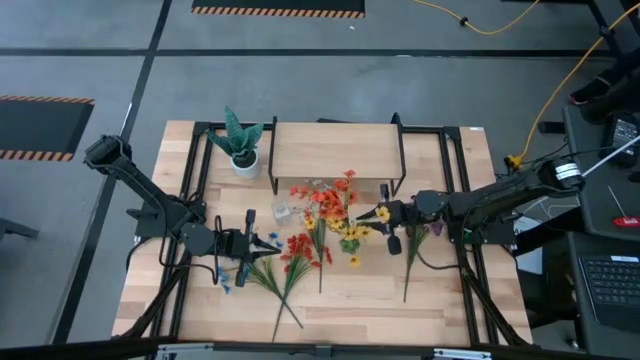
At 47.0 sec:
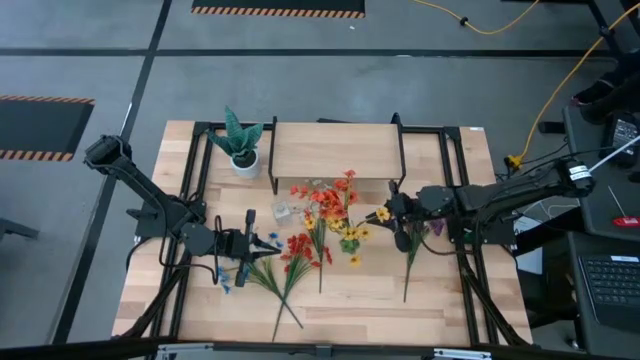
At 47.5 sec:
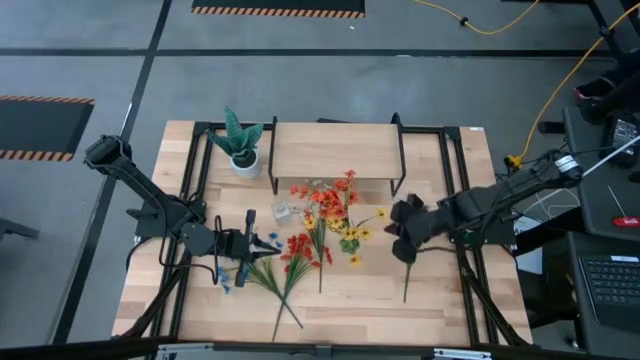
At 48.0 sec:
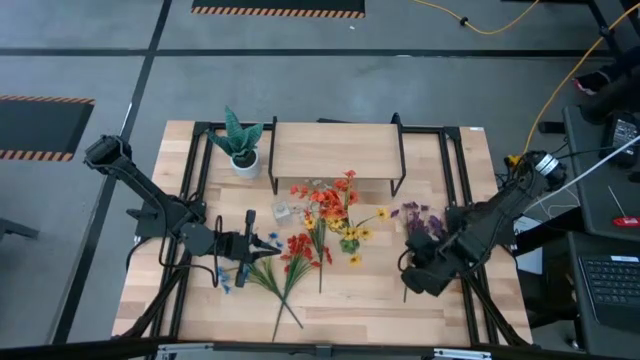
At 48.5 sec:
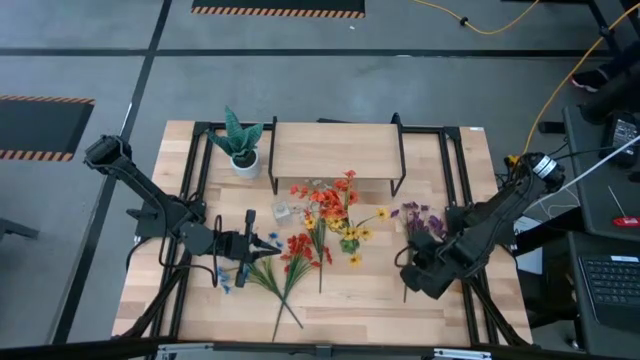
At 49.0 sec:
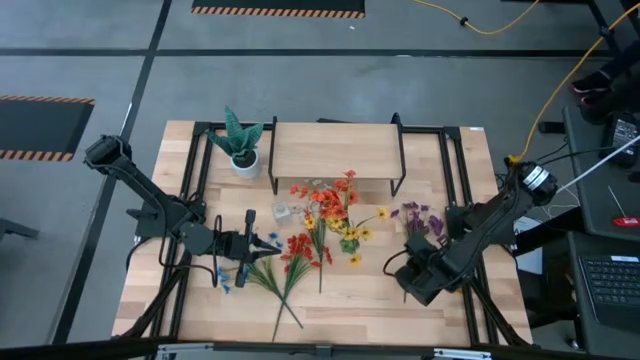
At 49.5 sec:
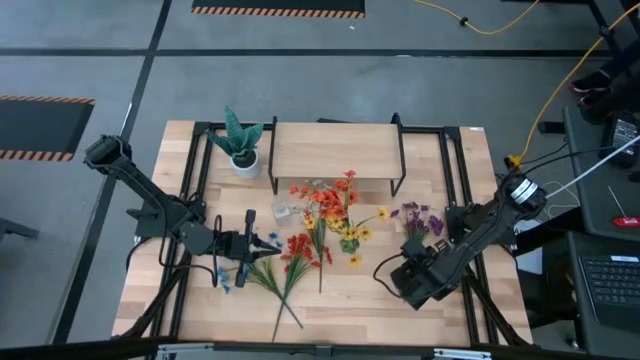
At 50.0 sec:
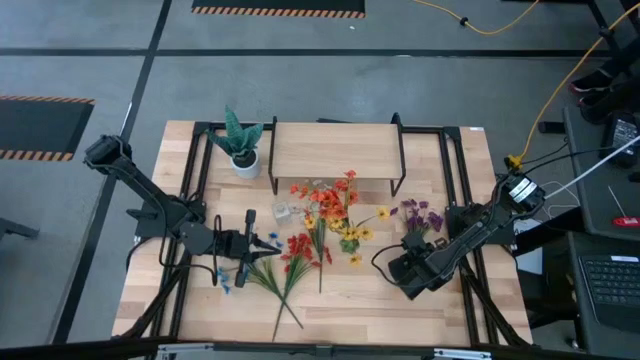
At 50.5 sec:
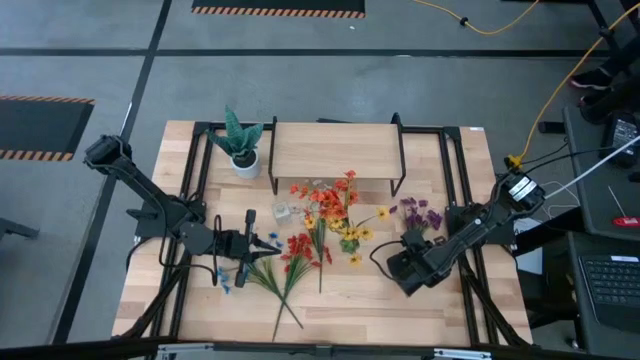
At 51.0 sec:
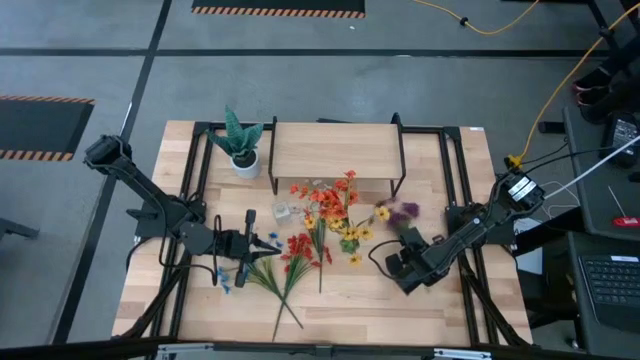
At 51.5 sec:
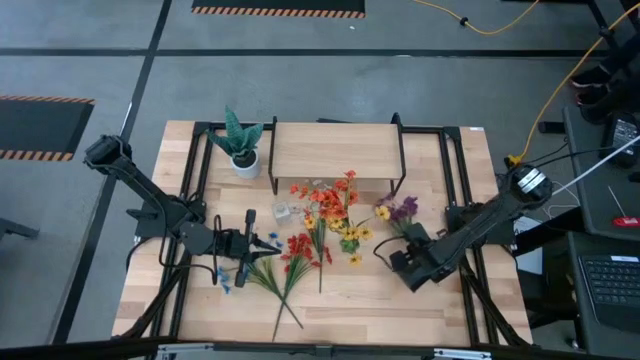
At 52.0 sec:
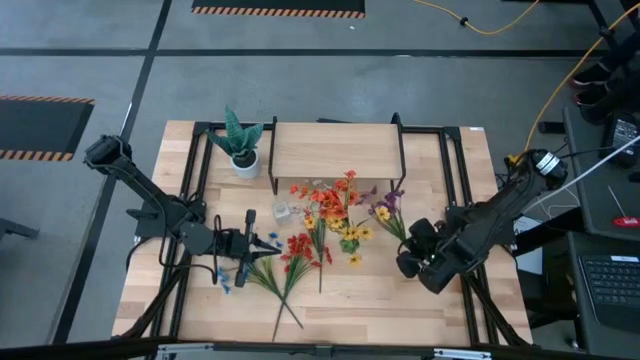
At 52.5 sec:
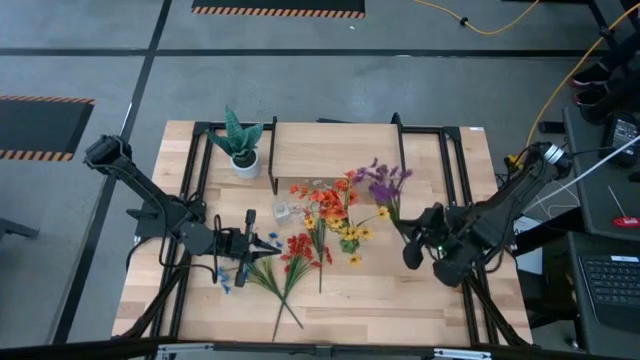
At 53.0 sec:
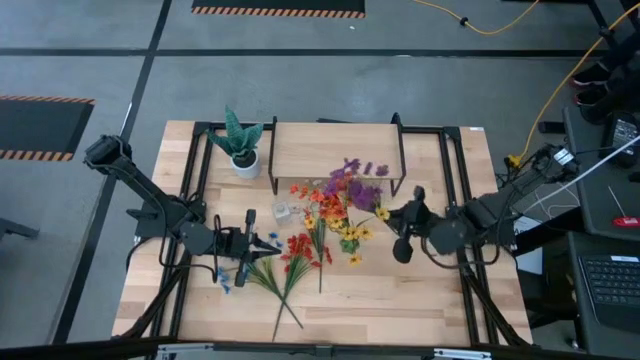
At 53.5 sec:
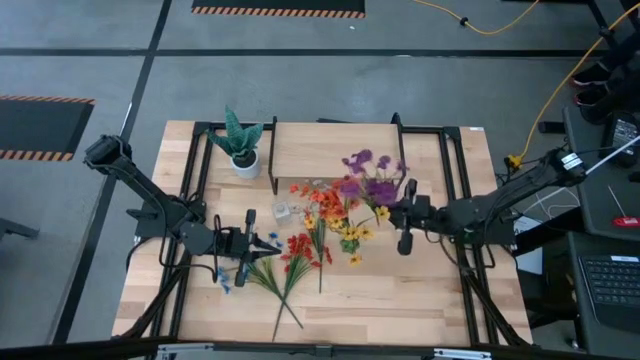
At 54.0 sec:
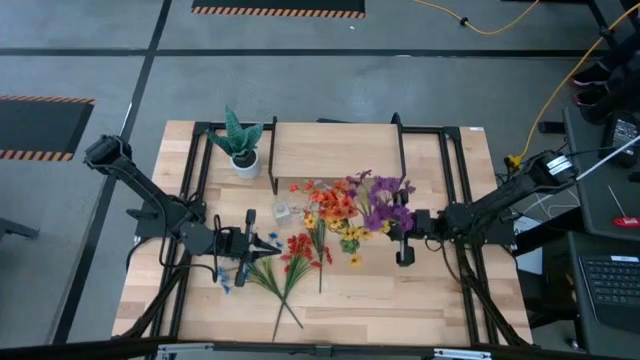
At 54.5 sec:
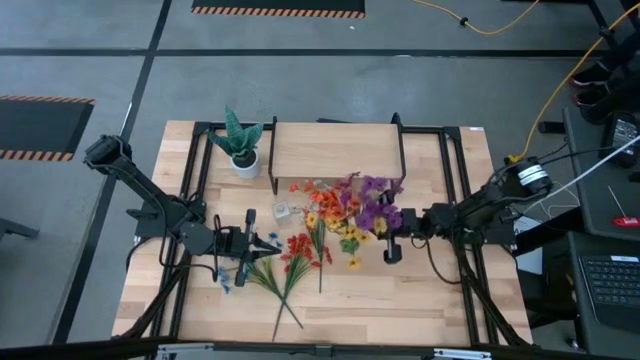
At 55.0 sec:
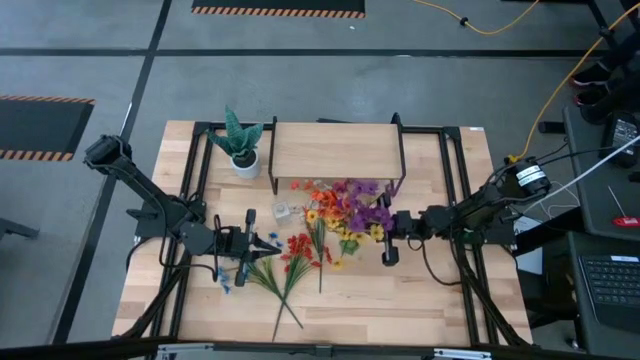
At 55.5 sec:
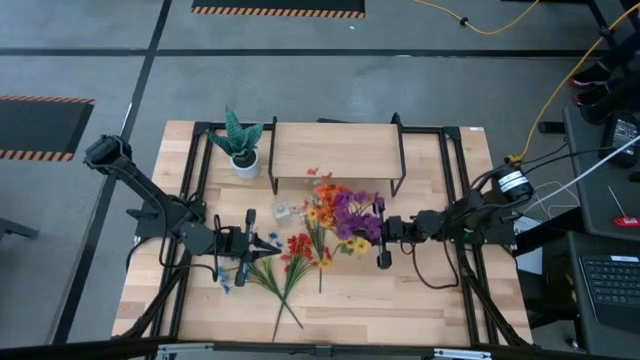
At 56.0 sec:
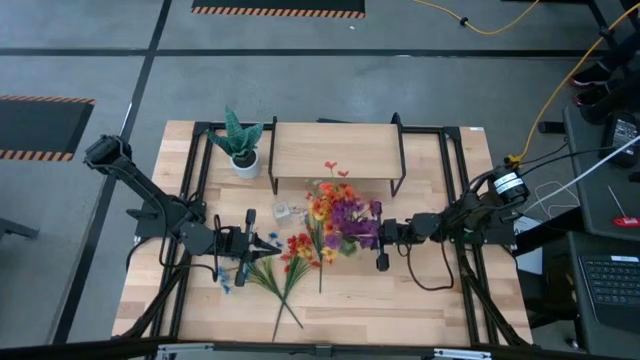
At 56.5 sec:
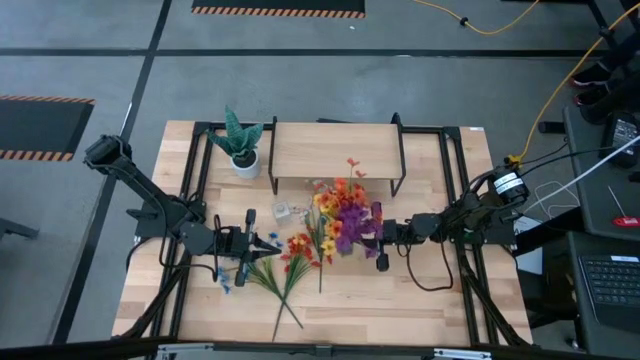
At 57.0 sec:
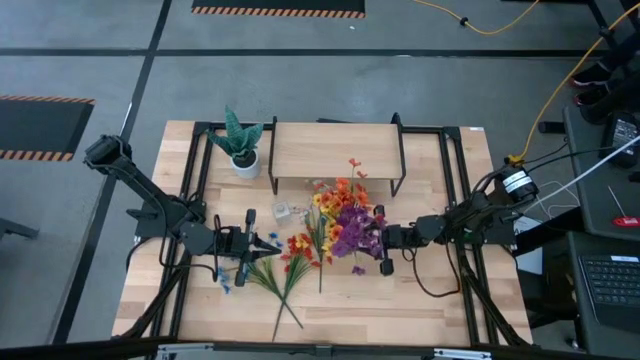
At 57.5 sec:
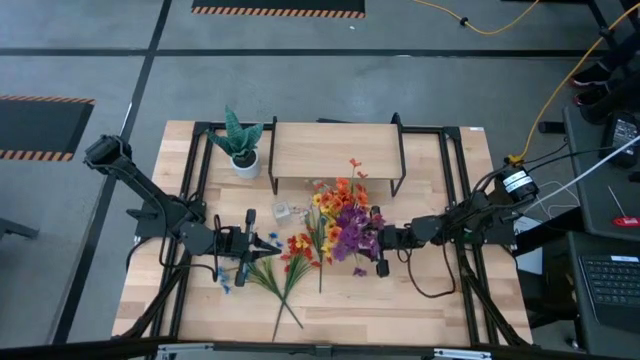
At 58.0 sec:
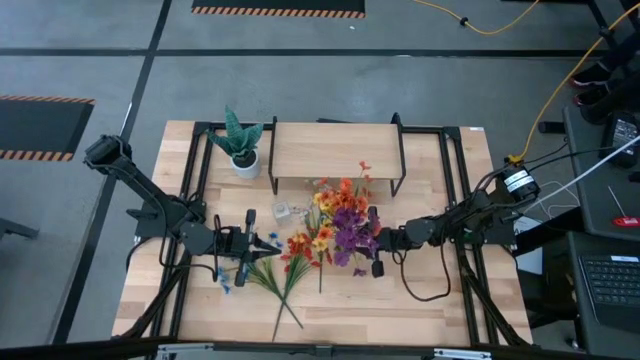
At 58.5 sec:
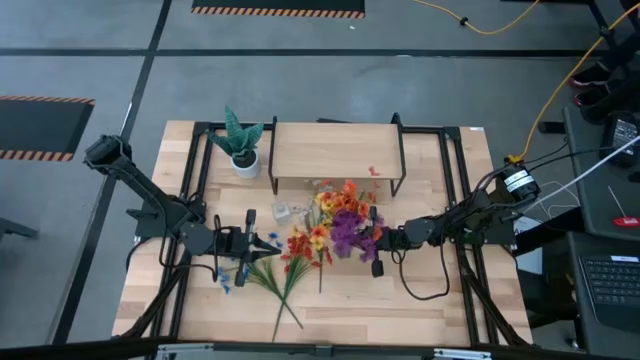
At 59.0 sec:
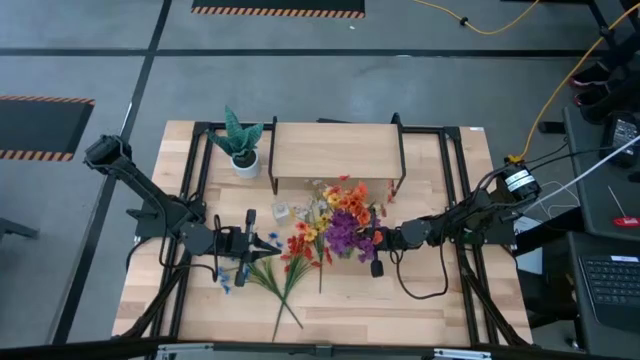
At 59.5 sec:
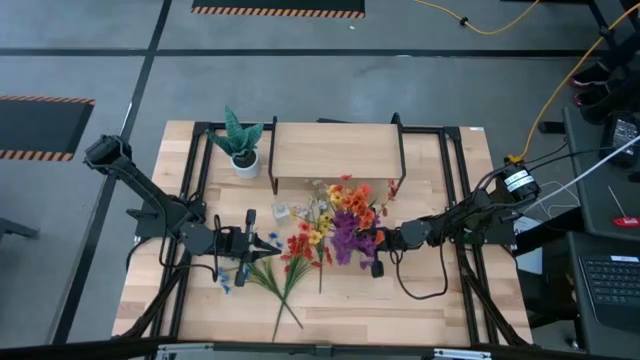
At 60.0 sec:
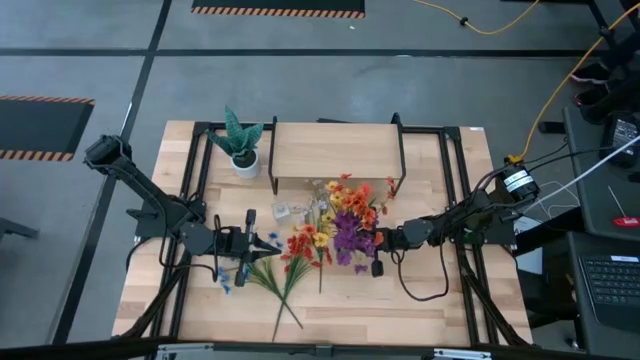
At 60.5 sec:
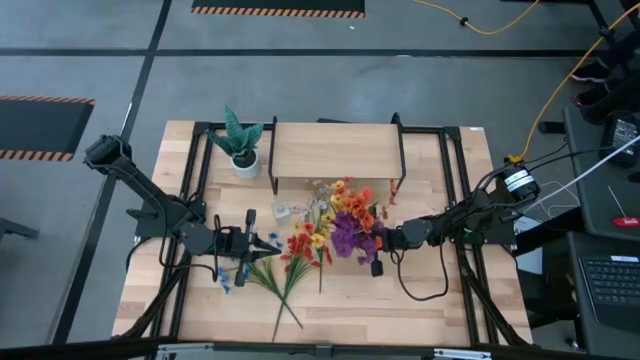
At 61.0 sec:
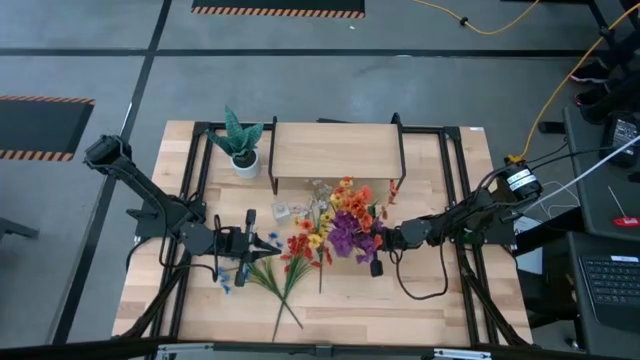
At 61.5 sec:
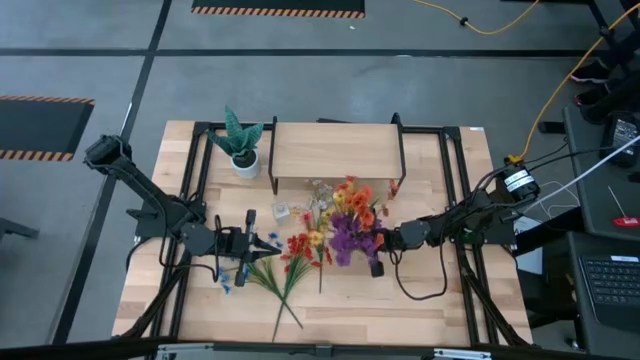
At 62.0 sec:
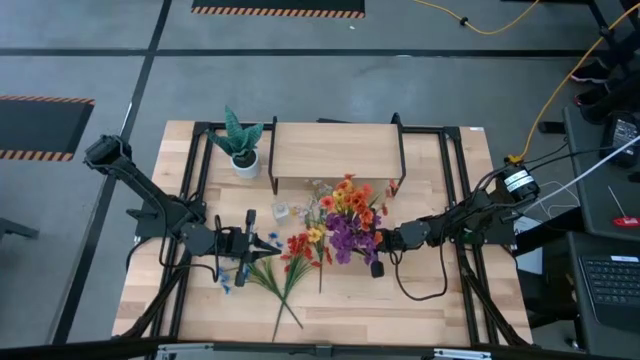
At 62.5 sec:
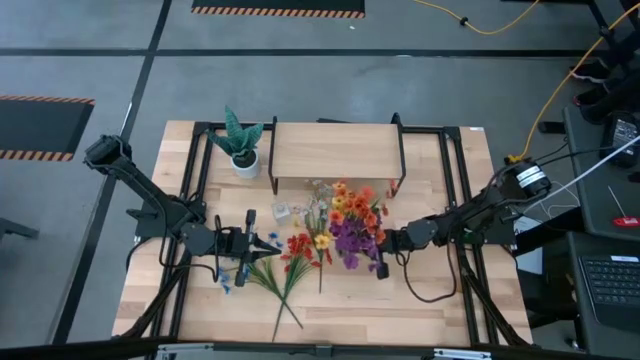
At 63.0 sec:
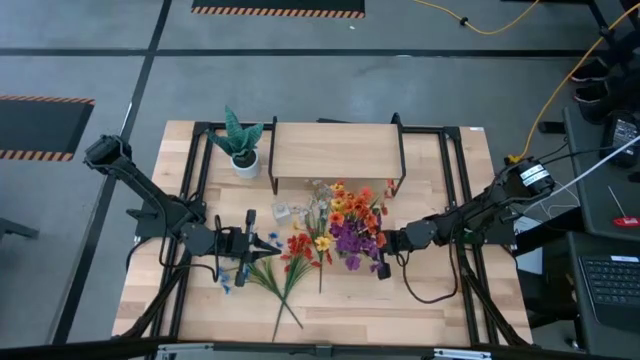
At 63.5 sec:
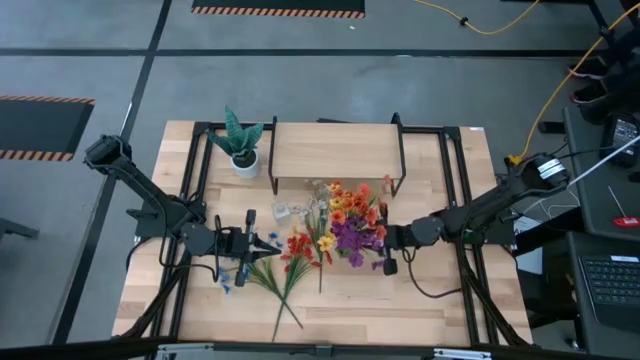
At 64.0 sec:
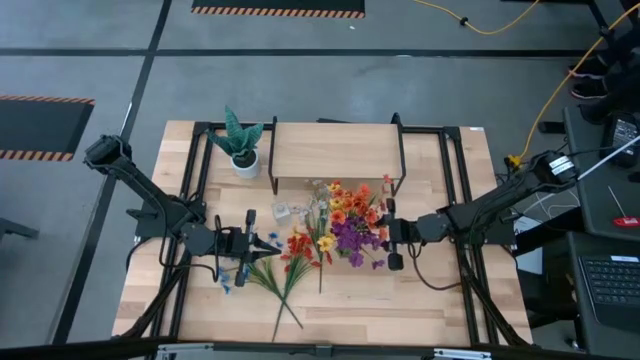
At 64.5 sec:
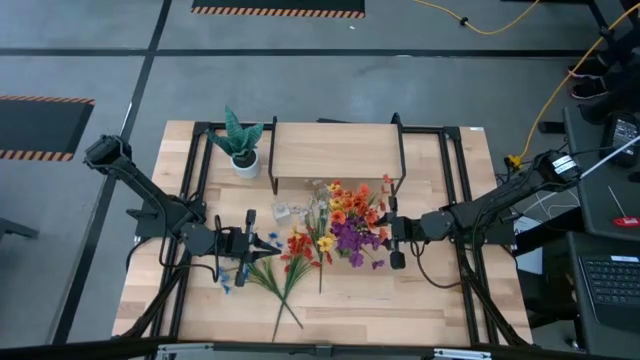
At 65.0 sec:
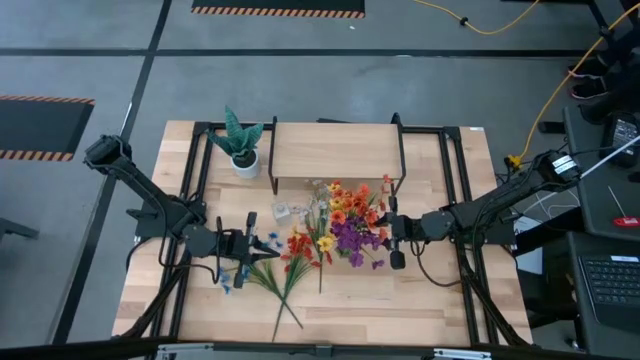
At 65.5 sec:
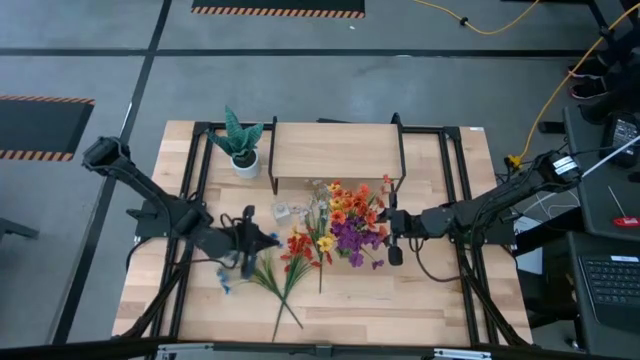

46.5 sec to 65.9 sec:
Task: Pick and place flowers into a vace then onto a shelf
Put the purple flowers into the green vase

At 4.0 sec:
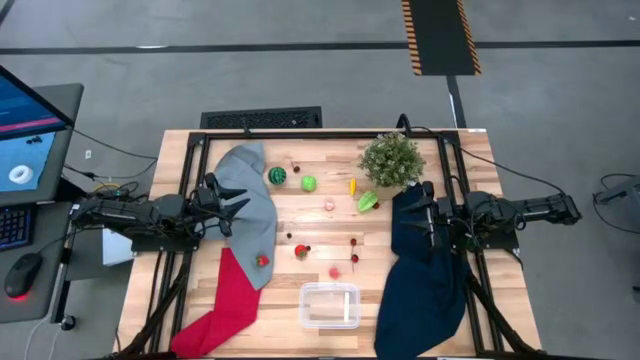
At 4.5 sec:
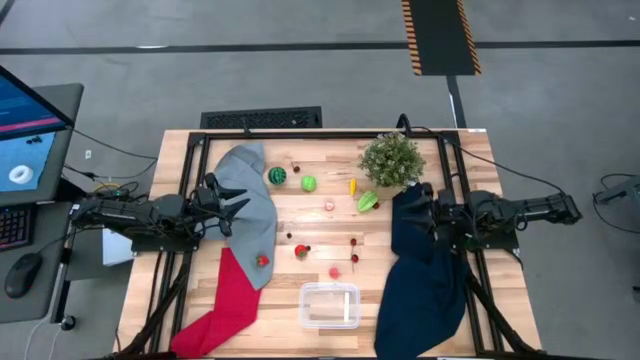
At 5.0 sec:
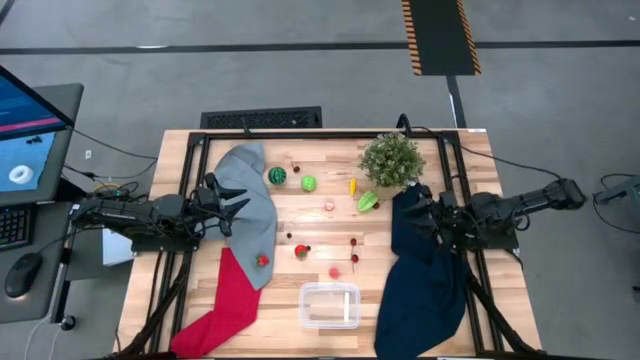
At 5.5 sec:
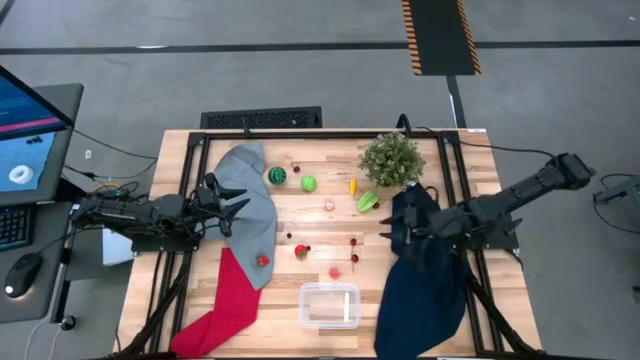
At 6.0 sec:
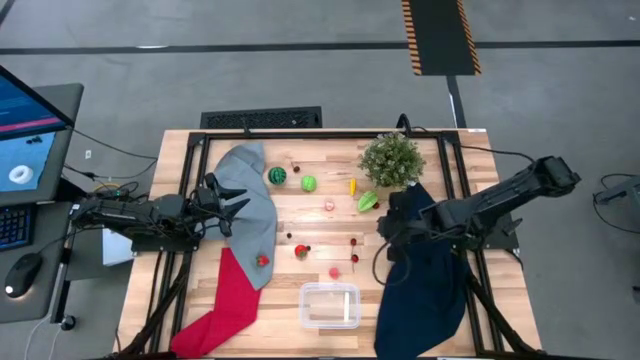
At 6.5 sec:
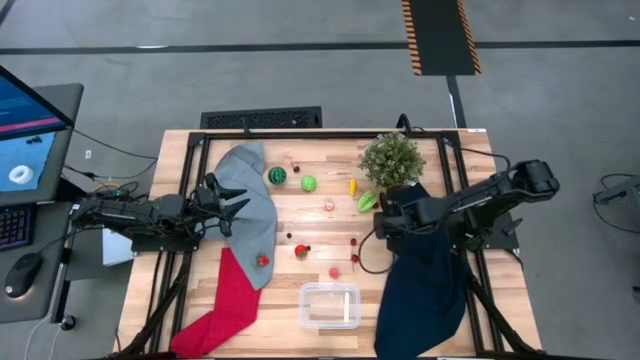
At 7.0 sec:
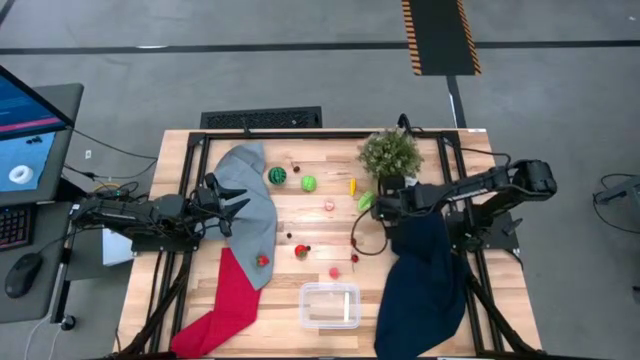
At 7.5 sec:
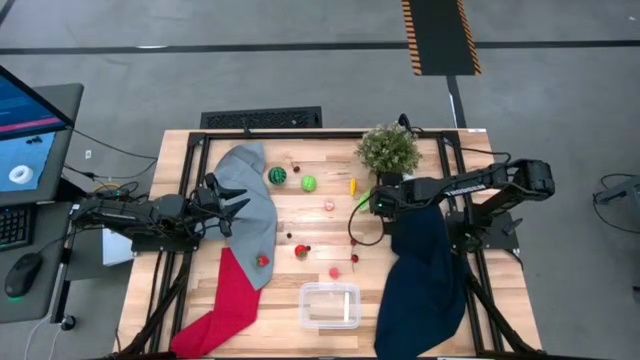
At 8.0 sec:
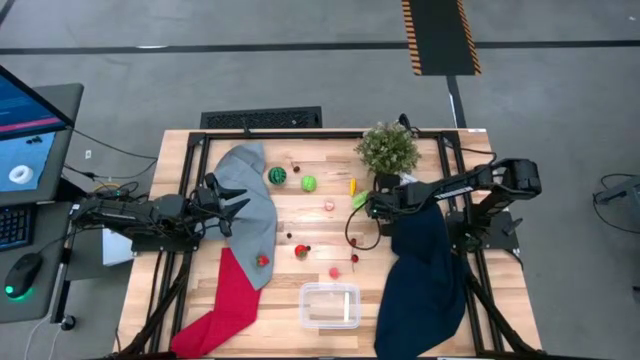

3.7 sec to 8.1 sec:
Task: Pick and placing Produce into tupperware
Put the cherry into the transparent bin
